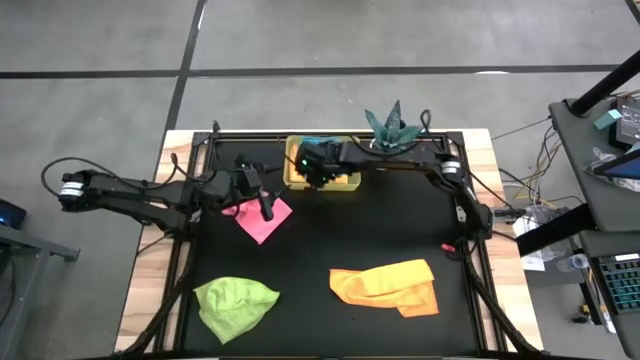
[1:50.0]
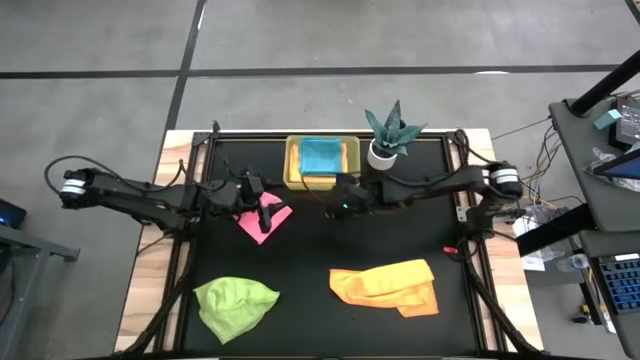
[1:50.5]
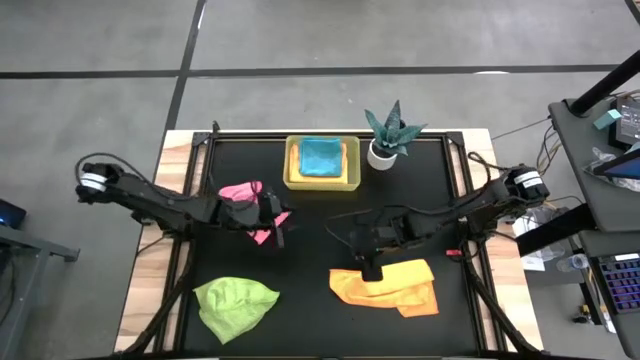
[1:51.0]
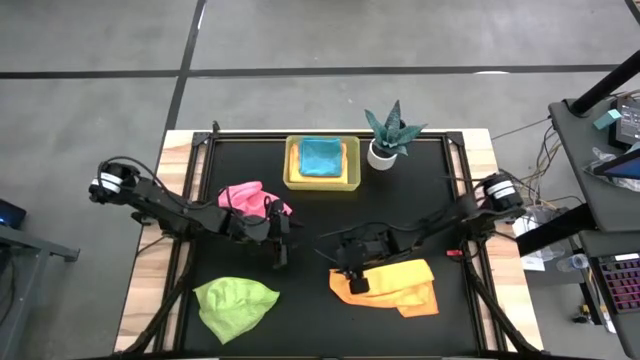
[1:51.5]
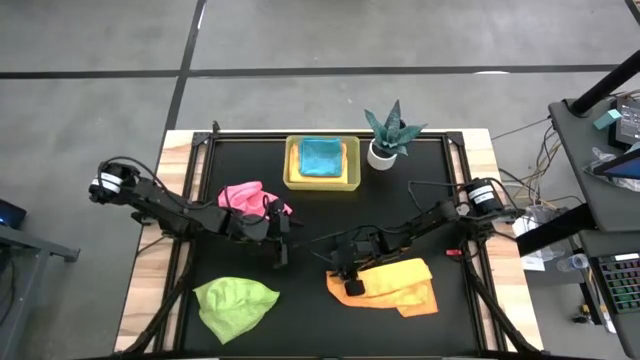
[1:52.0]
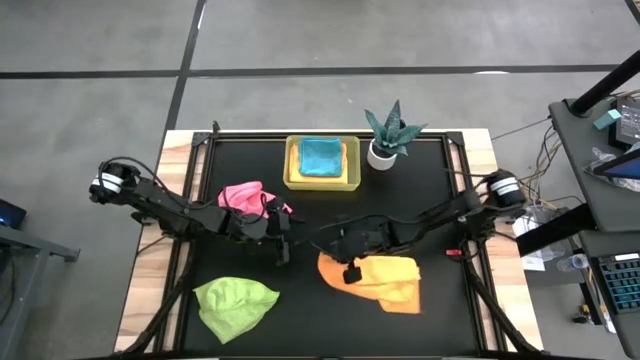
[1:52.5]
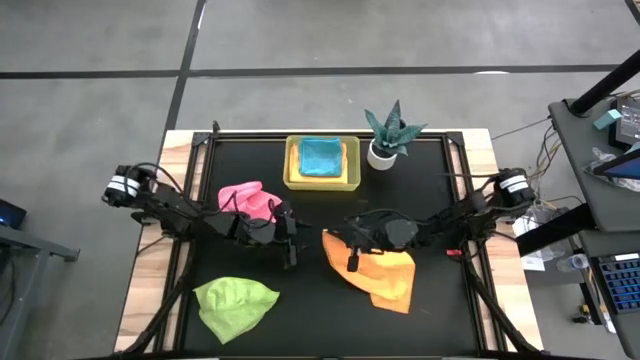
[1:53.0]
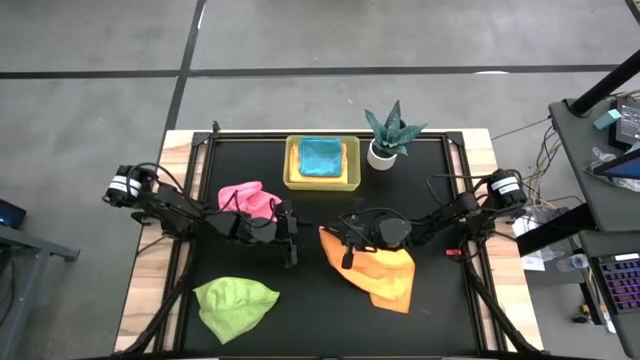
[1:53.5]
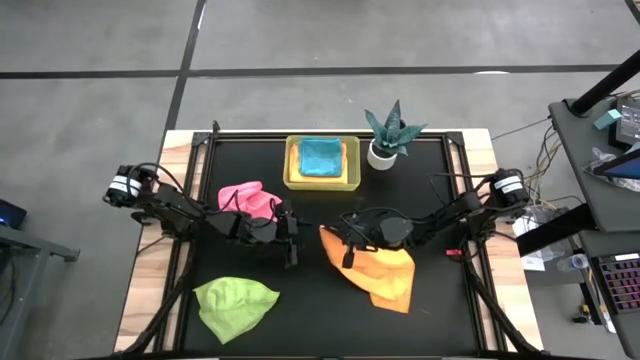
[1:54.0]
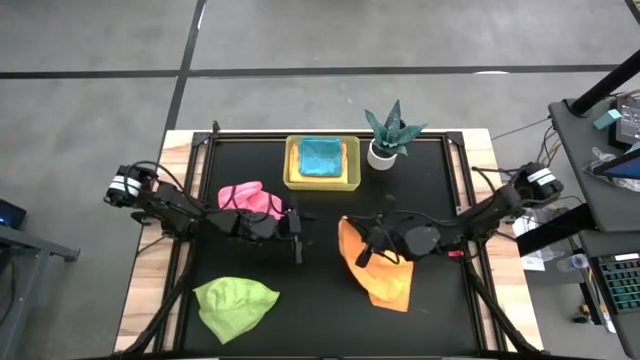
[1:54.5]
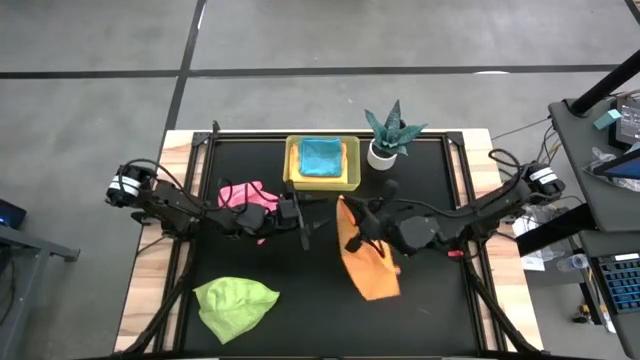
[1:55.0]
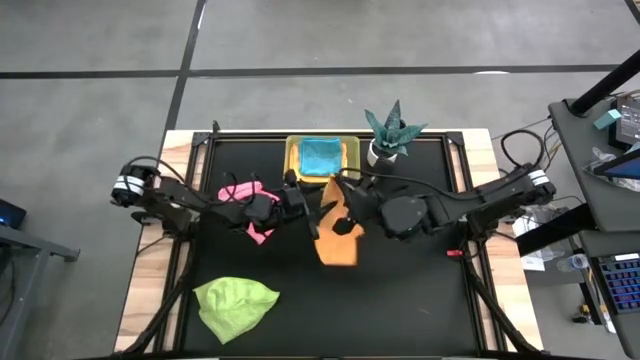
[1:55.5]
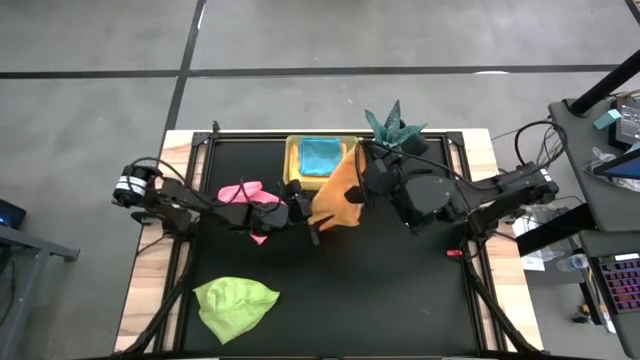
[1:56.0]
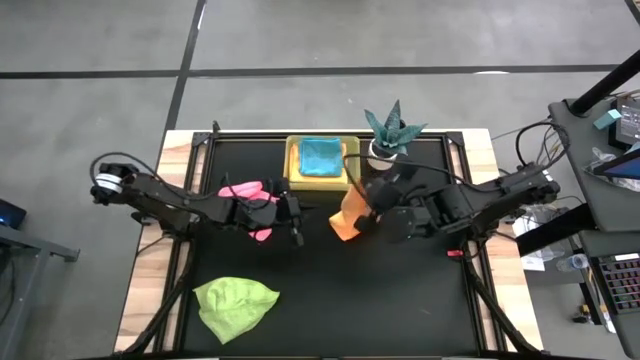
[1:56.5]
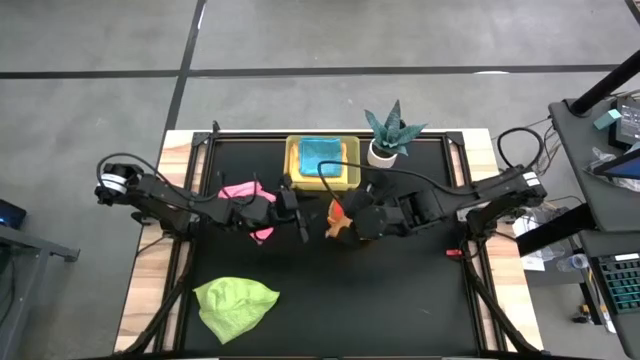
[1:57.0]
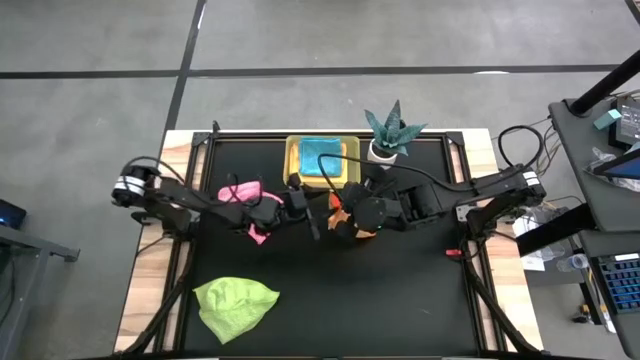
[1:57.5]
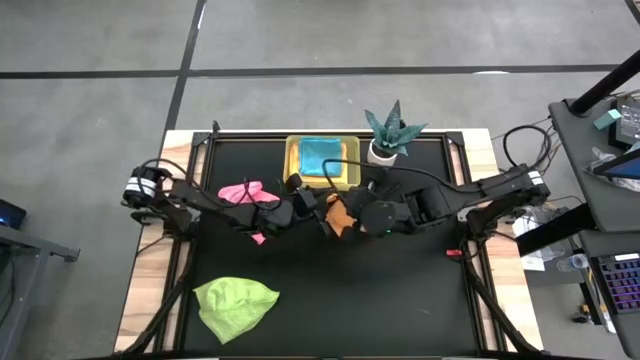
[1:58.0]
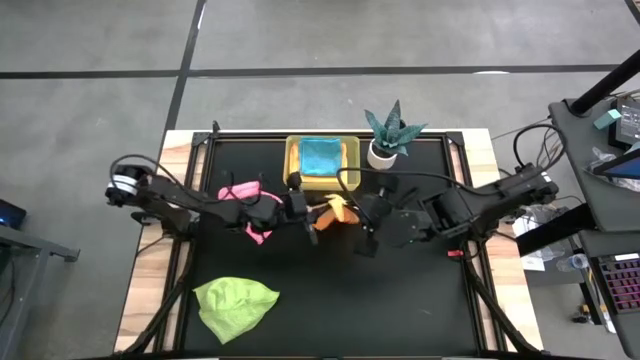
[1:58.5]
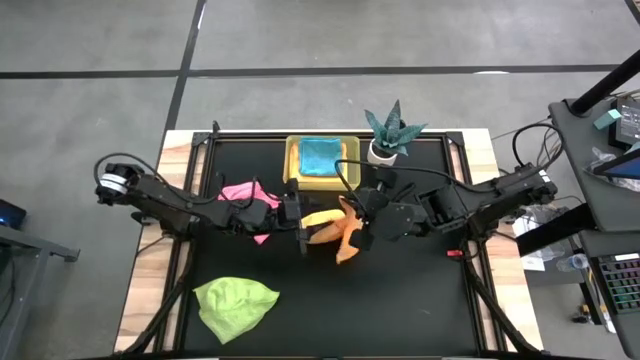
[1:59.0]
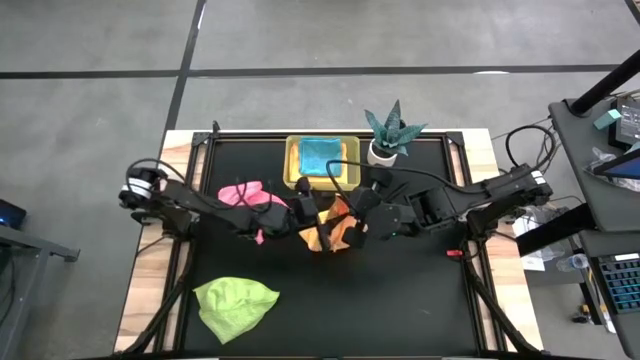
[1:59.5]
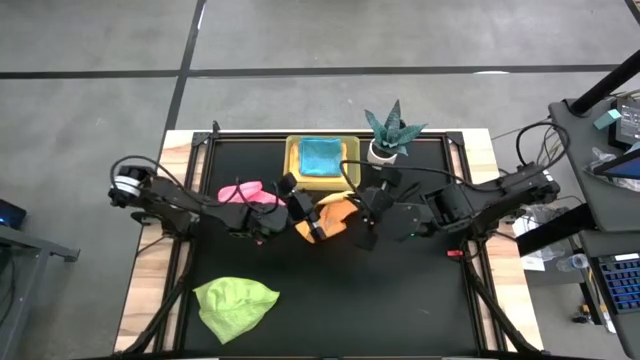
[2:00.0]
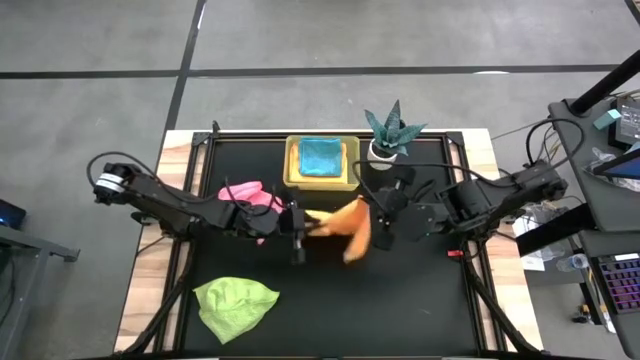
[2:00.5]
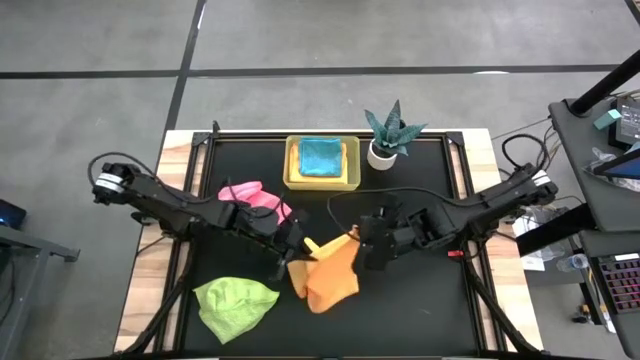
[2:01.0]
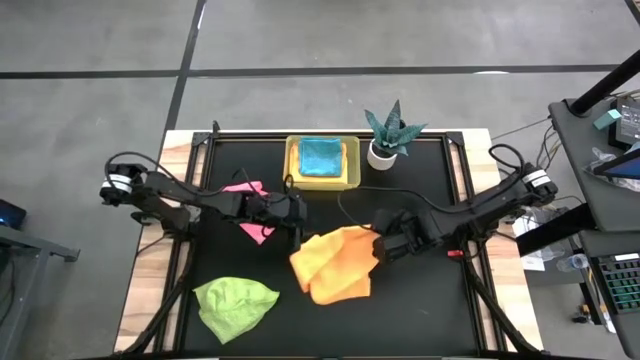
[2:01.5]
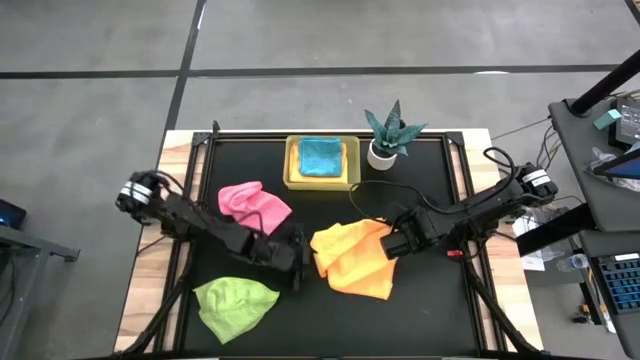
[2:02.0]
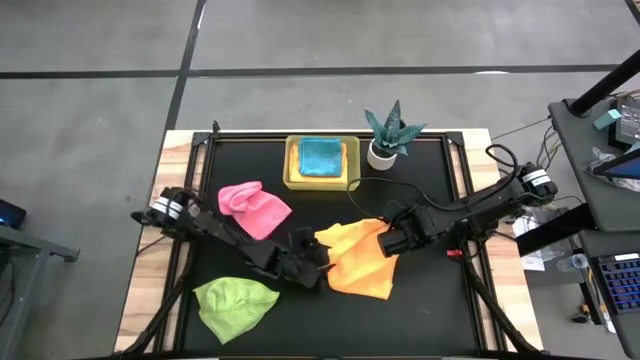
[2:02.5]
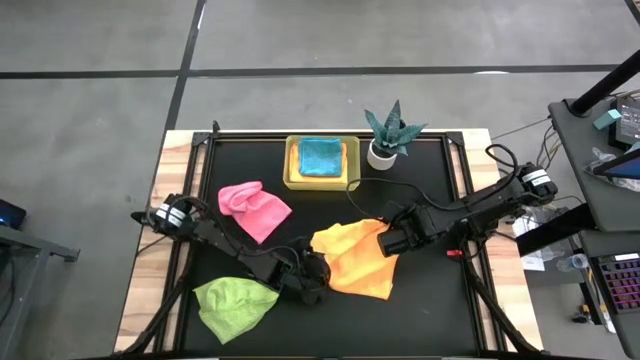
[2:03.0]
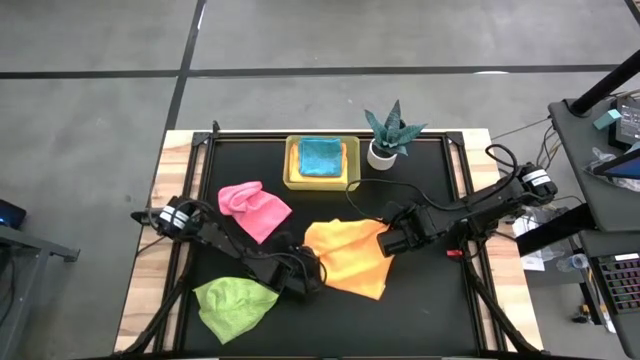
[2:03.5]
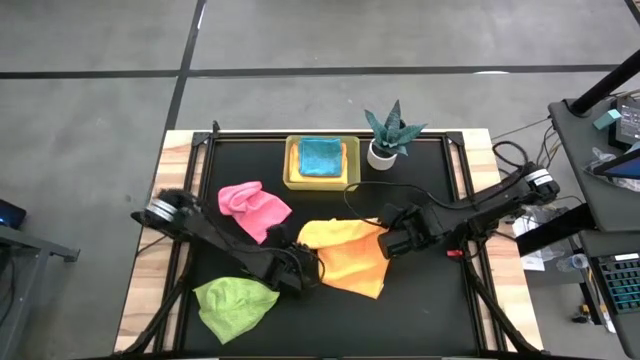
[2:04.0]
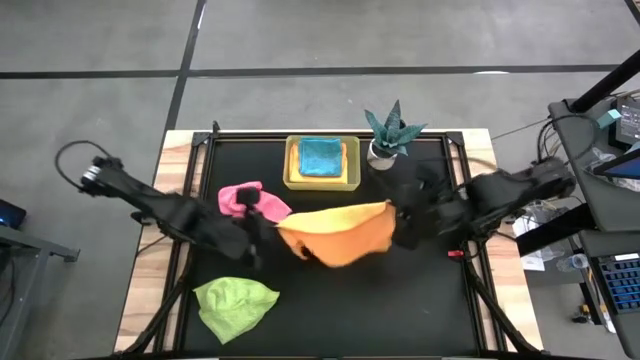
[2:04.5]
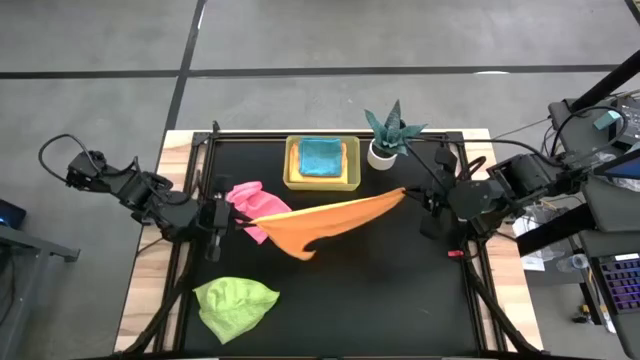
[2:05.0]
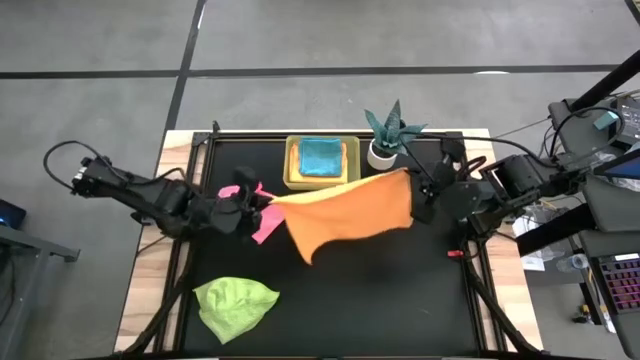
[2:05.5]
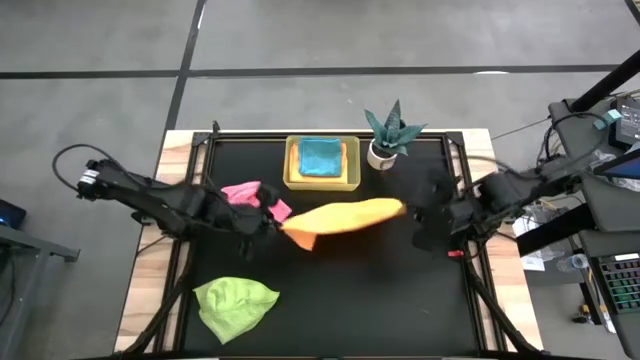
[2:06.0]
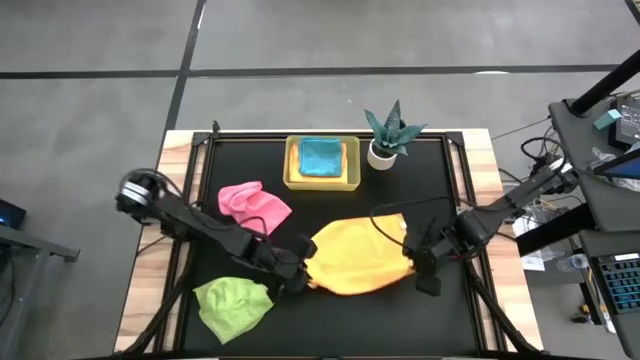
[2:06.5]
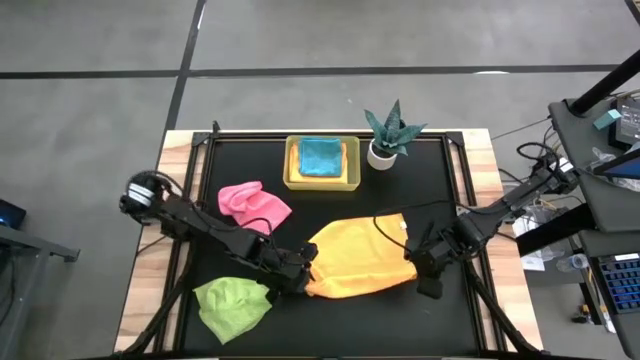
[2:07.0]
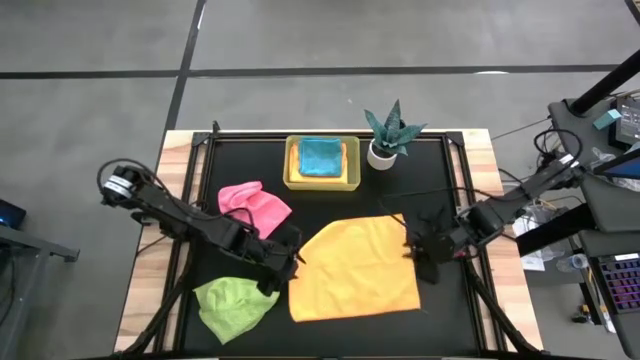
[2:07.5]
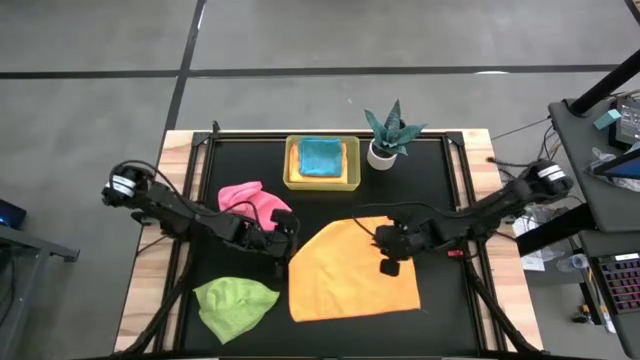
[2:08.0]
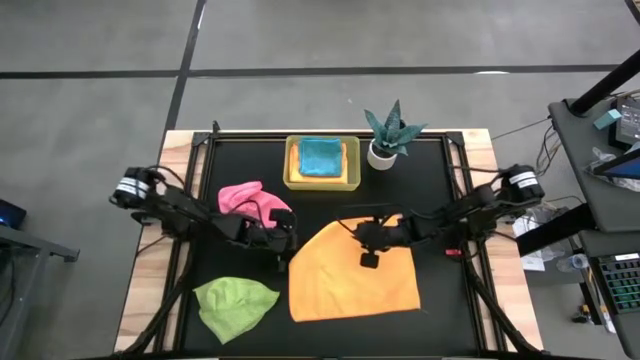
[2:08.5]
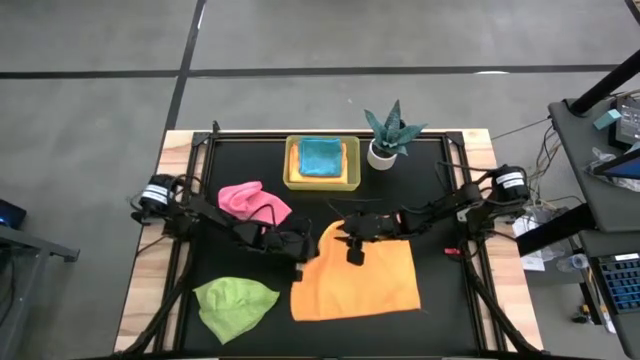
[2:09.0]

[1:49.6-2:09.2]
Task: Fold microfiber towels
Fold the orange microfiber cloth

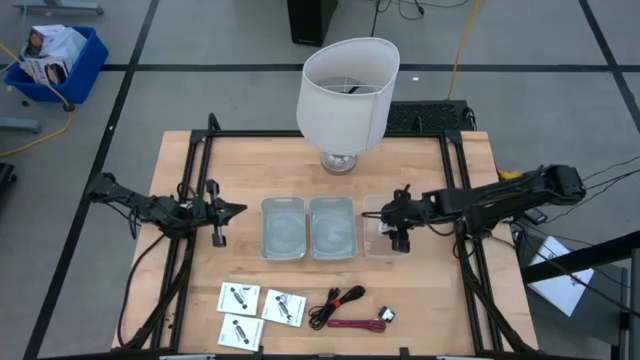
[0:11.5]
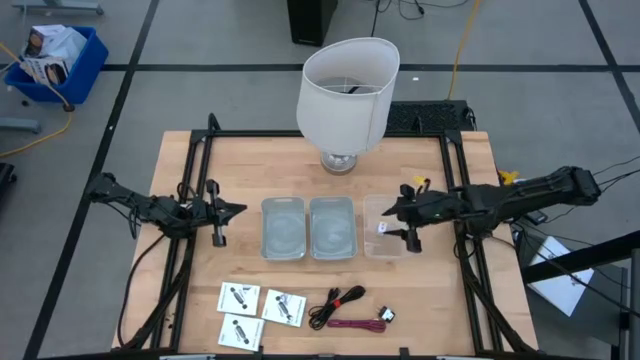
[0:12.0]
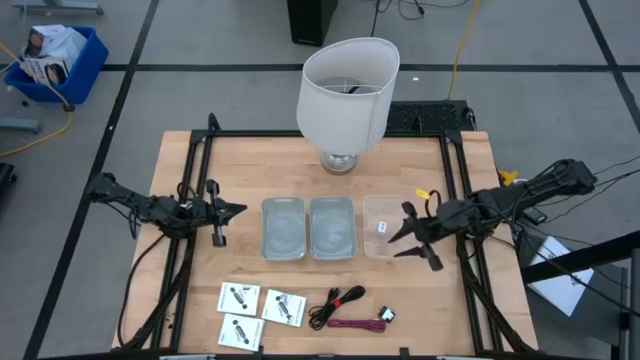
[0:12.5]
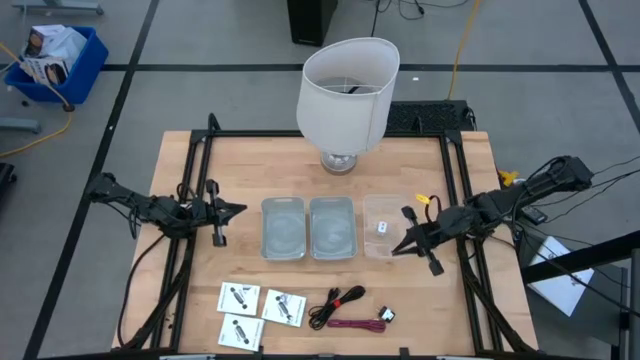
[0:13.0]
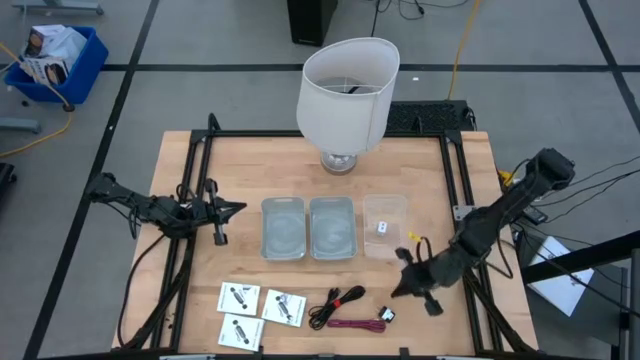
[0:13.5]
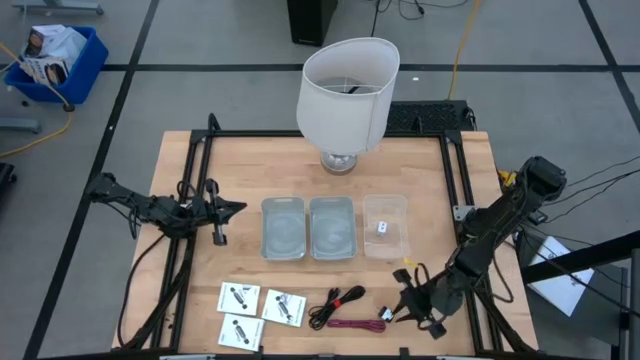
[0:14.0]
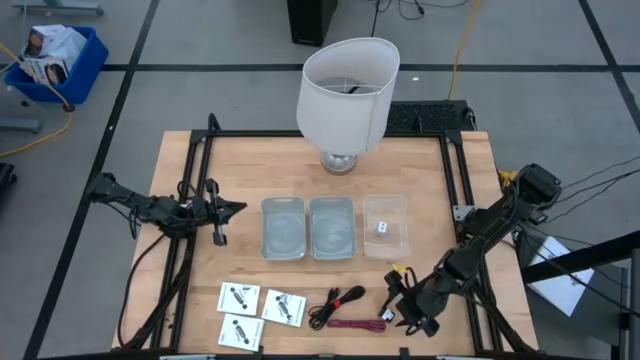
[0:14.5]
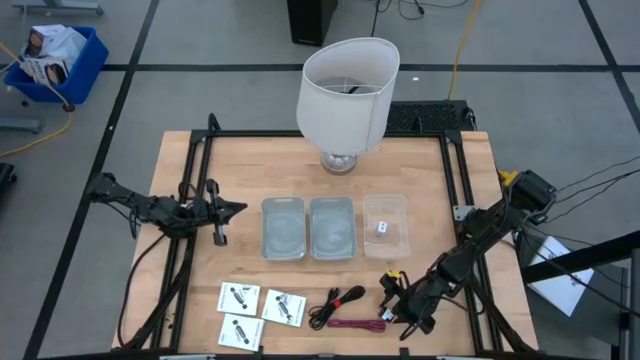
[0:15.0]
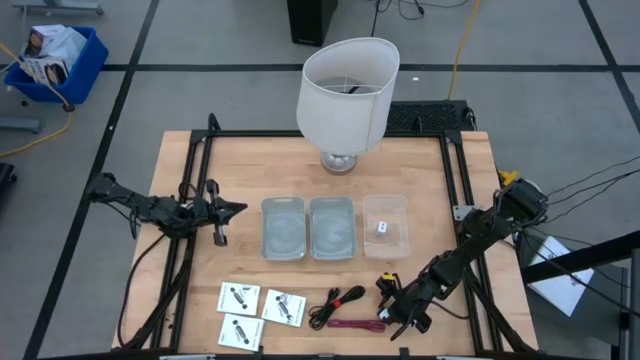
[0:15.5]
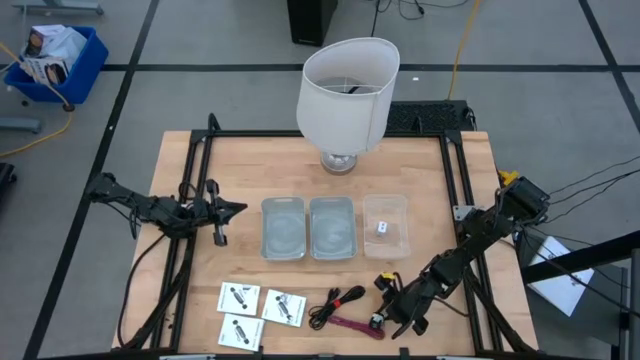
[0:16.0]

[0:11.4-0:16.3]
Task: Pick and place items into bin
Put the black charger adapter into the transparent bin
